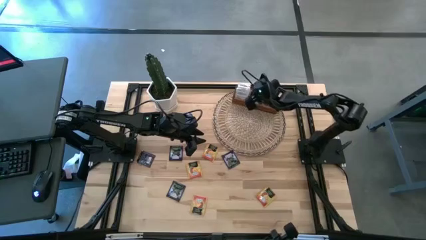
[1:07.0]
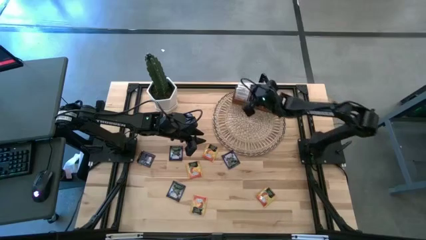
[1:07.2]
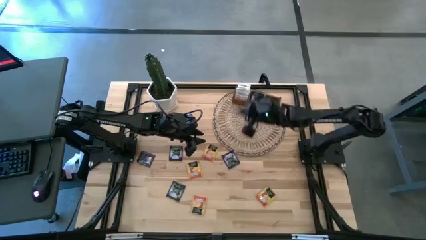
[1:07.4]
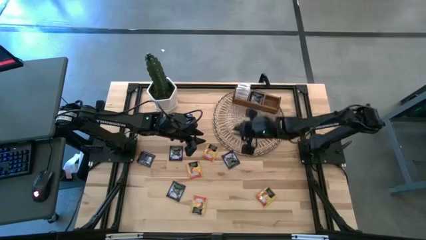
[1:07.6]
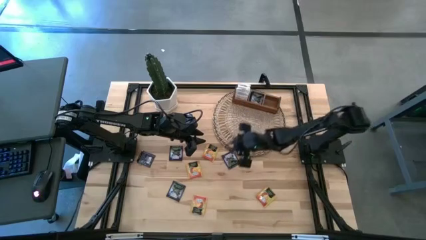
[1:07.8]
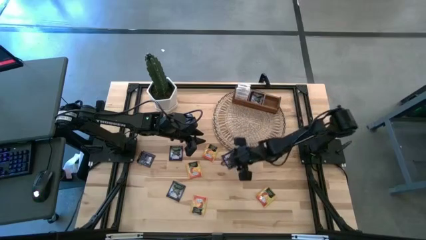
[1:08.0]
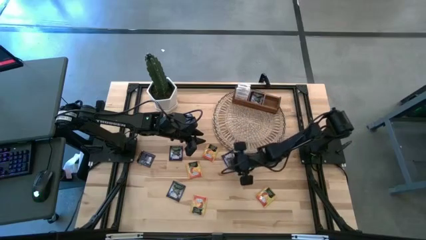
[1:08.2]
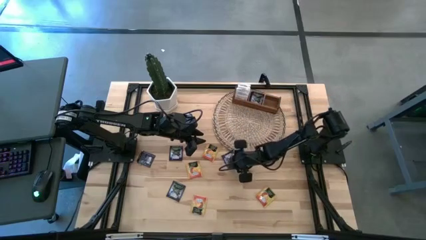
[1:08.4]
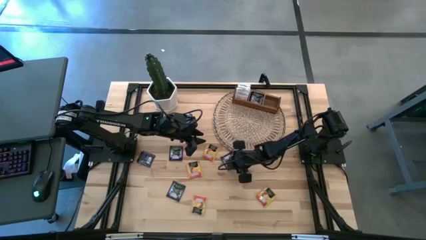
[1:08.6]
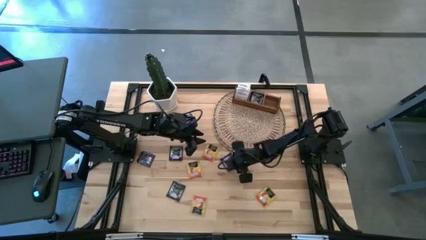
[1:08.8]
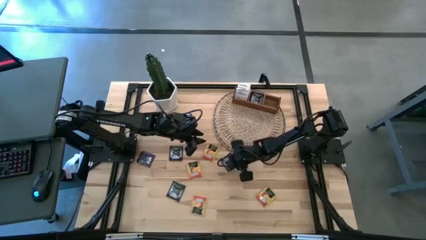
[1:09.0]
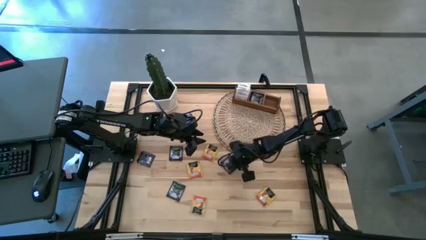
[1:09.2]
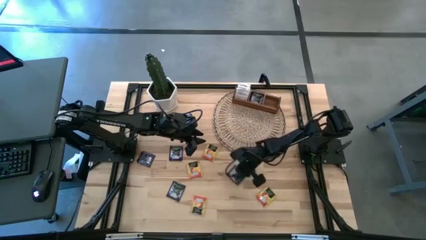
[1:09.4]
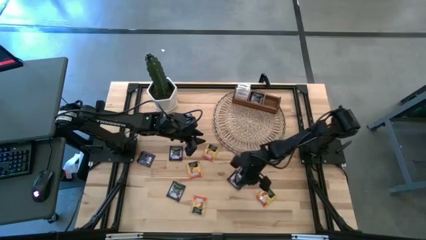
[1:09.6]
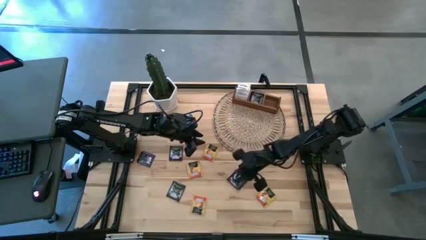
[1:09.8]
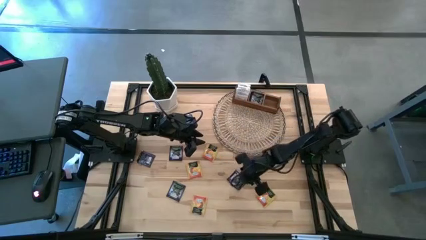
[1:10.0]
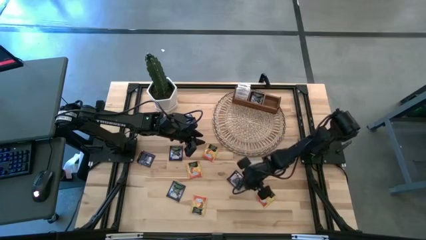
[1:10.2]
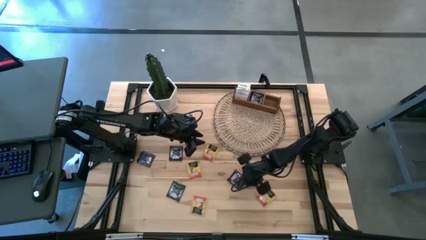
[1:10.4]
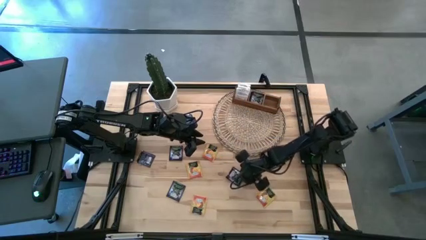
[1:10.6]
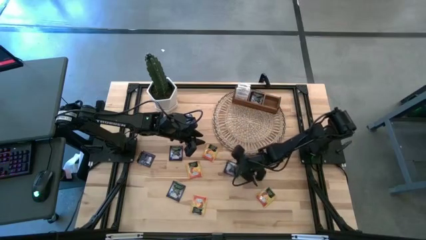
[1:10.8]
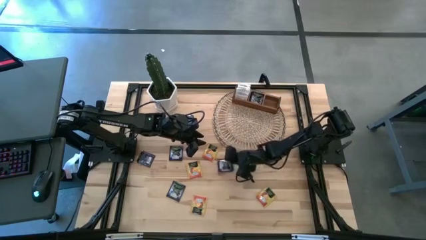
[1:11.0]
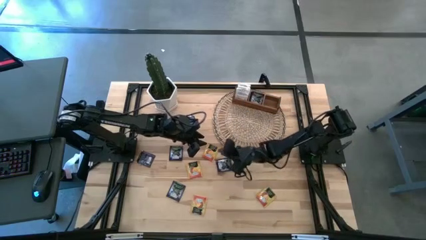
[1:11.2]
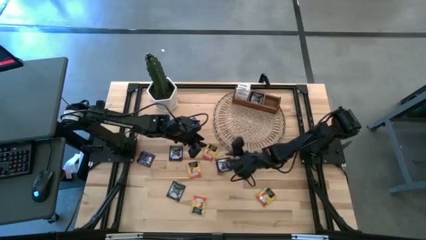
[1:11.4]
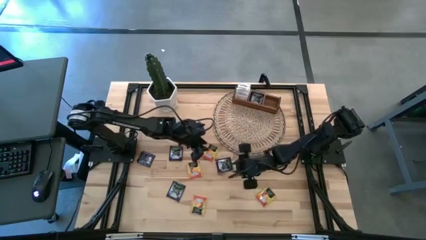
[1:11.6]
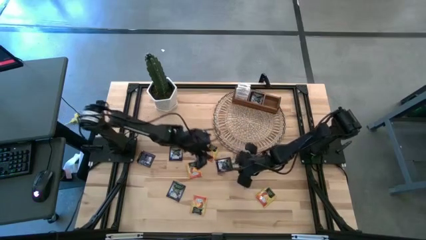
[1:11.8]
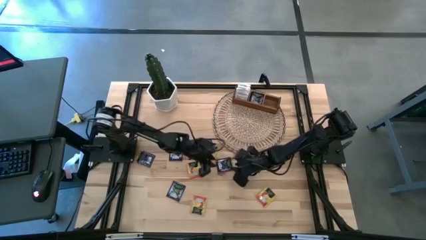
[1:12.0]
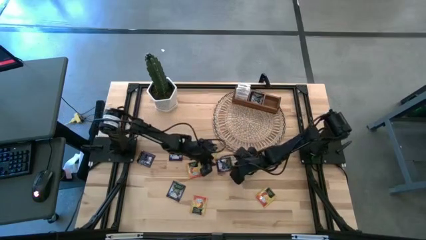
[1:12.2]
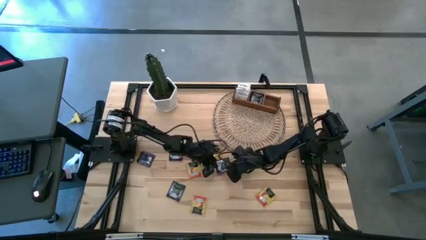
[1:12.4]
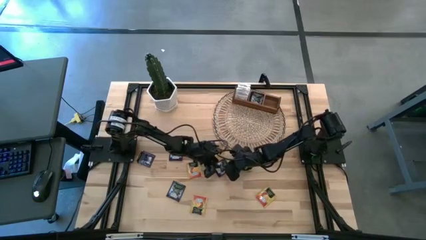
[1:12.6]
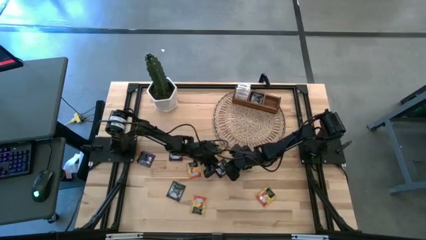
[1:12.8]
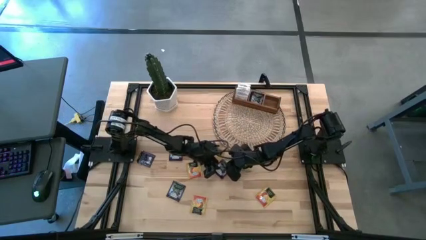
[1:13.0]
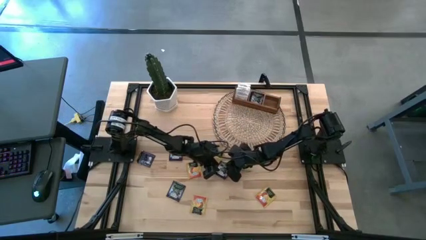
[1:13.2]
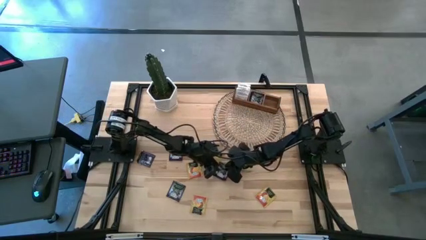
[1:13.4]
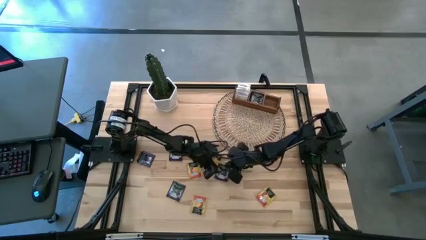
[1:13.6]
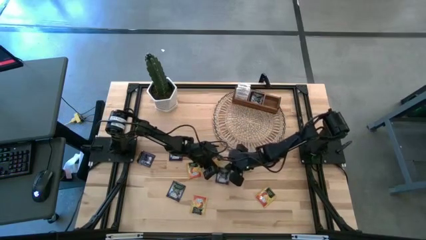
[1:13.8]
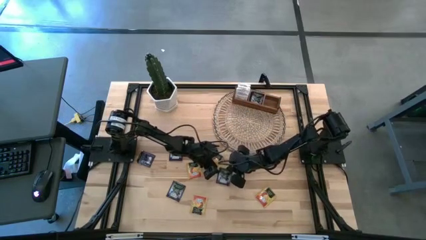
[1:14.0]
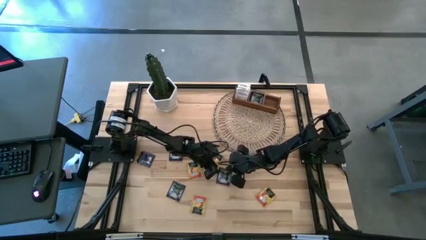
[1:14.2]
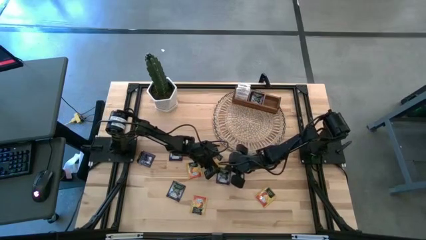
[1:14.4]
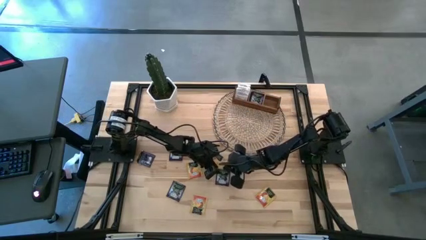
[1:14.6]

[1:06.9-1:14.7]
Task: Pick & Place Tea
Put the blue tea bag into the middle section of the wooden organizer

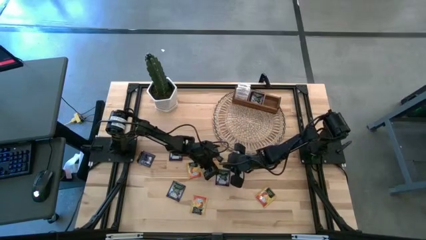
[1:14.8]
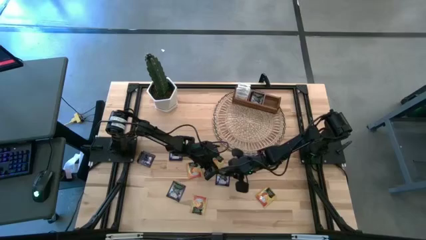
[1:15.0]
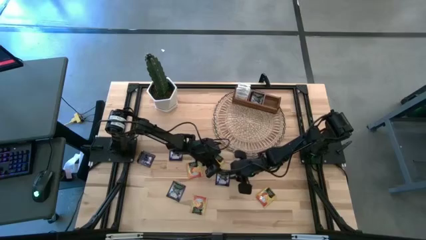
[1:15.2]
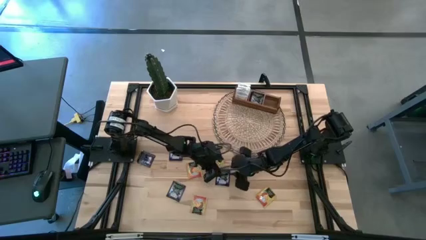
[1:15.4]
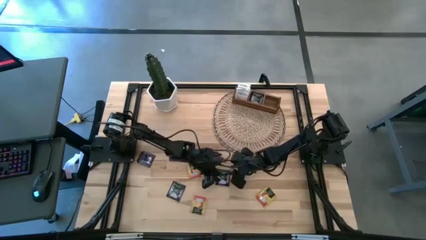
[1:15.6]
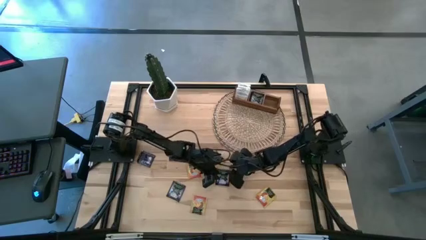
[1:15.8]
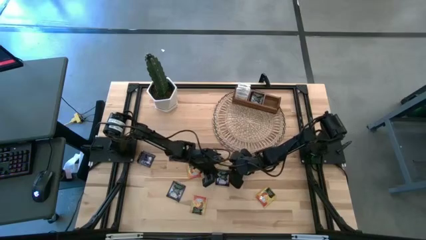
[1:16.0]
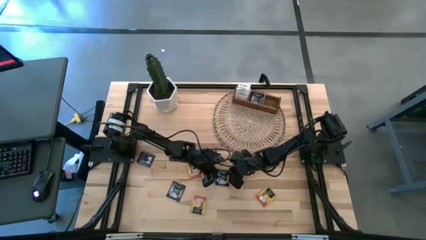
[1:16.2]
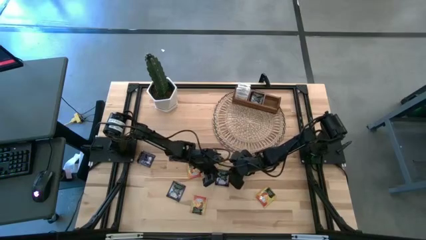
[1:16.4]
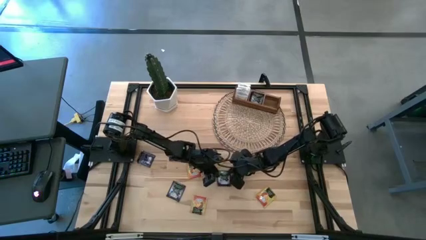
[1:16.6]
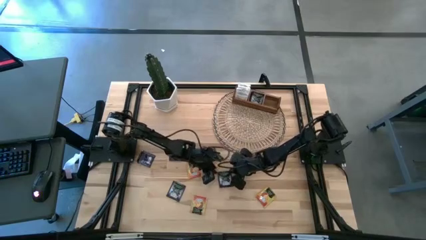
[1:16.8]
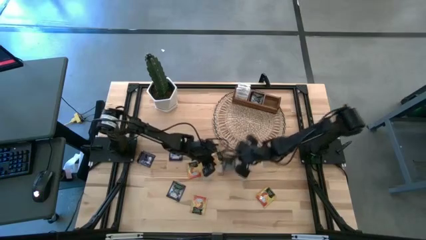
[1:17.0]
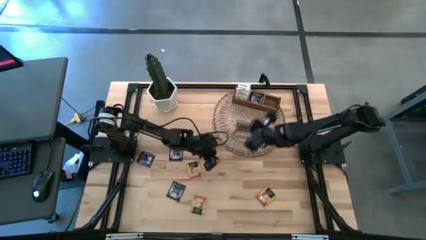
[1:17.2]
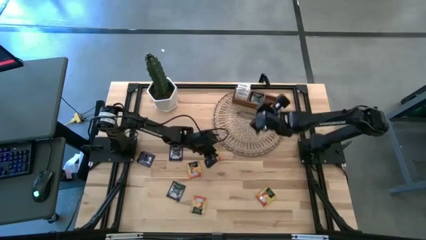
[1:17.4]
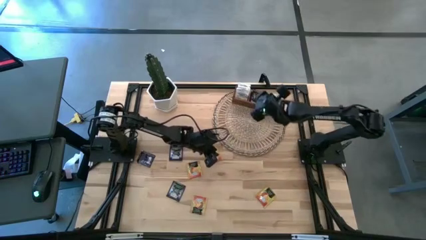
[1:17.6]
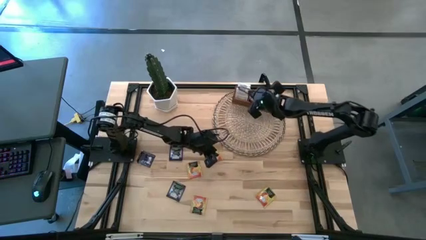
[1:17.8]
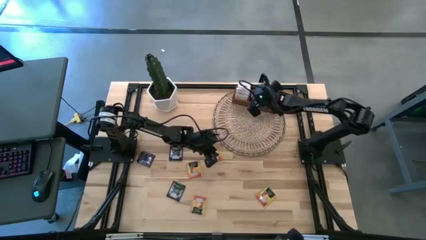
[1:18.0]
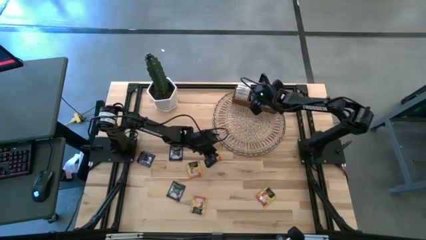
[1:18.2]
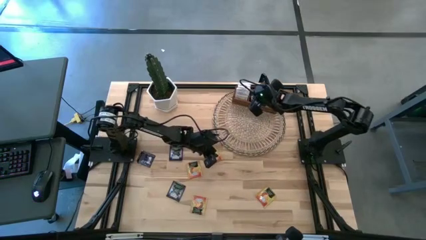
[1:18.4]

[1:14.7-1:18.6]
Put the blue tea bag into the middle section of the wooden organizer
